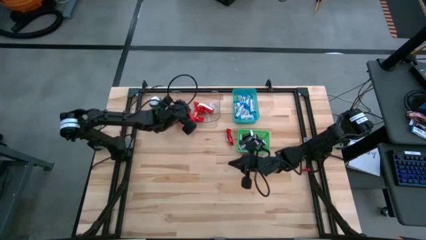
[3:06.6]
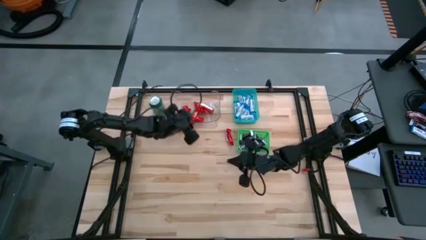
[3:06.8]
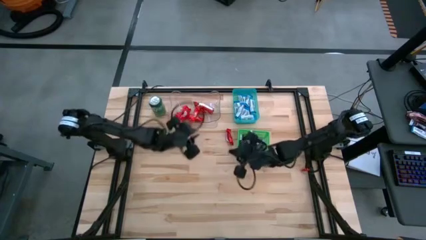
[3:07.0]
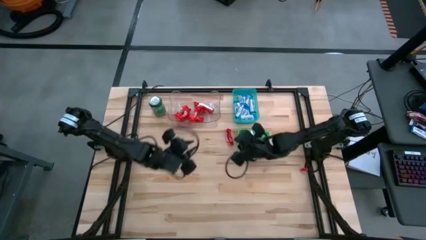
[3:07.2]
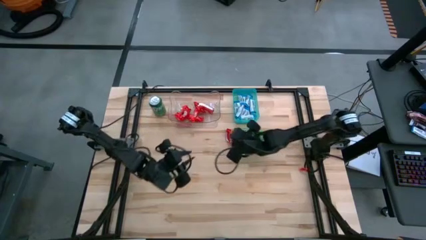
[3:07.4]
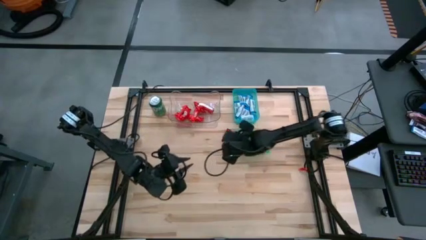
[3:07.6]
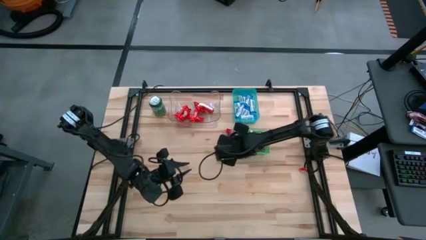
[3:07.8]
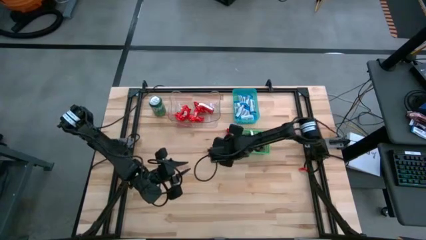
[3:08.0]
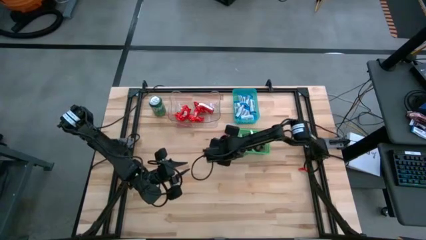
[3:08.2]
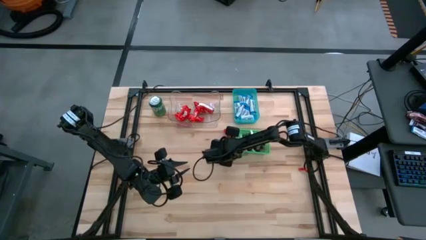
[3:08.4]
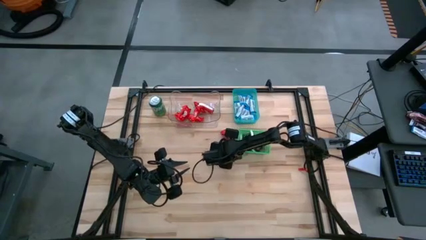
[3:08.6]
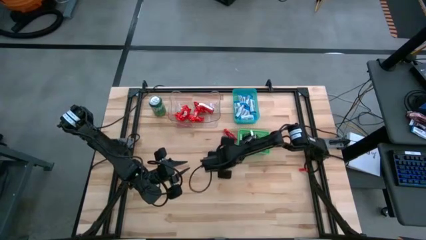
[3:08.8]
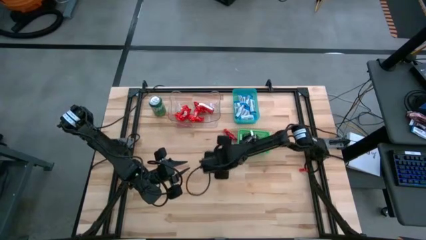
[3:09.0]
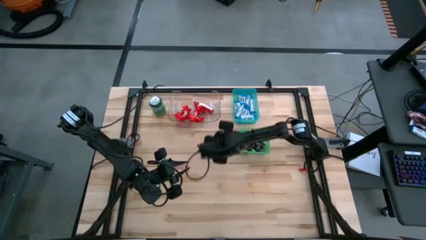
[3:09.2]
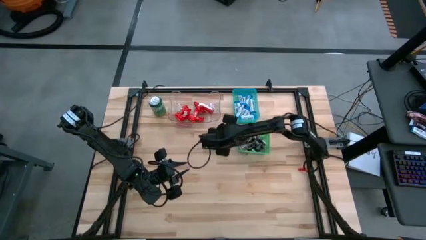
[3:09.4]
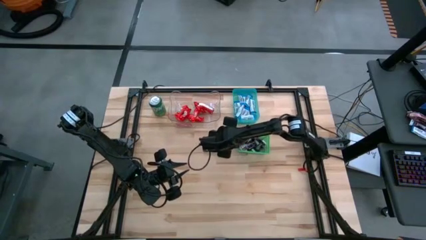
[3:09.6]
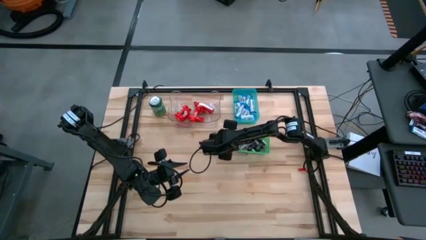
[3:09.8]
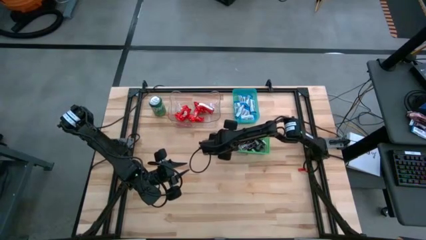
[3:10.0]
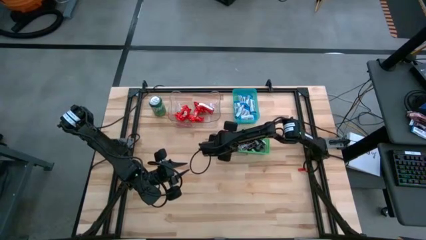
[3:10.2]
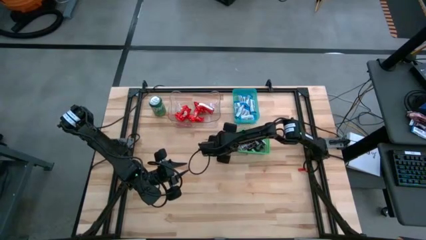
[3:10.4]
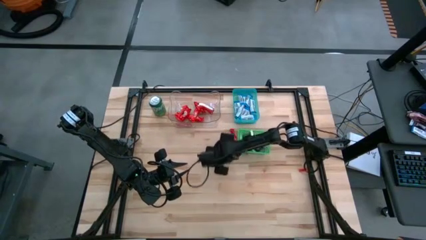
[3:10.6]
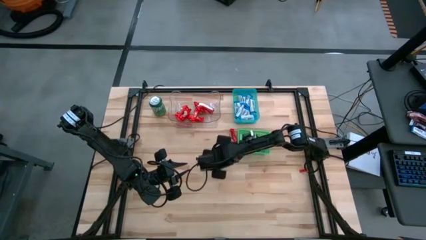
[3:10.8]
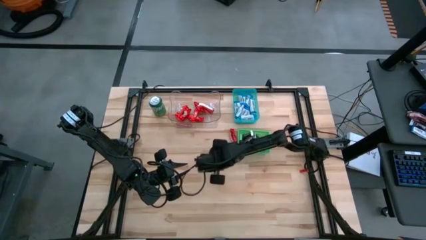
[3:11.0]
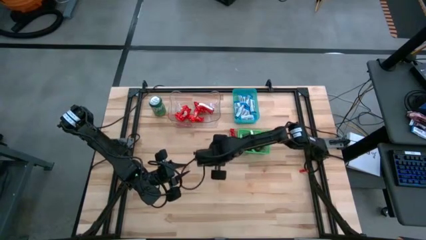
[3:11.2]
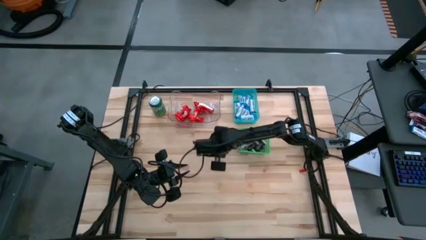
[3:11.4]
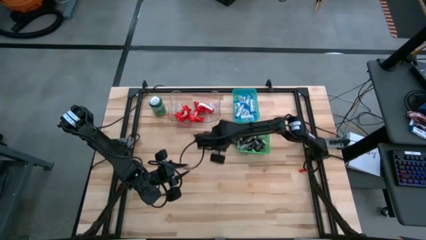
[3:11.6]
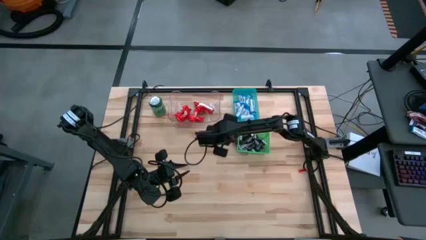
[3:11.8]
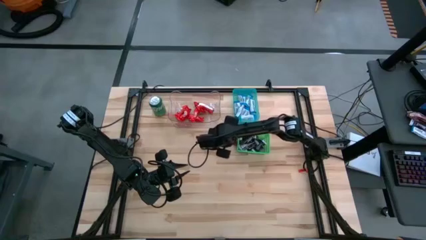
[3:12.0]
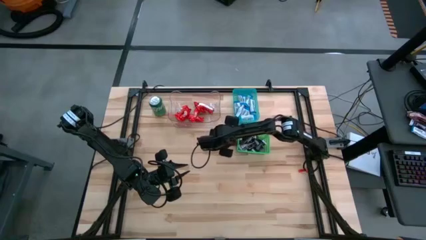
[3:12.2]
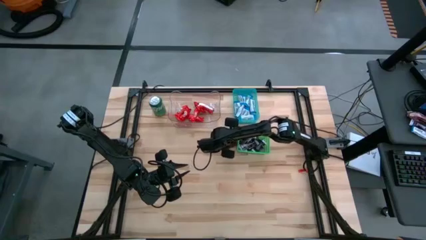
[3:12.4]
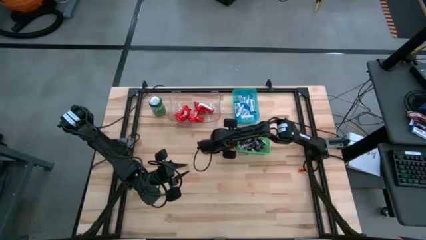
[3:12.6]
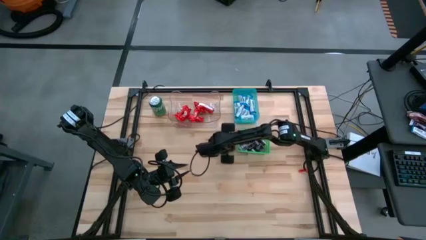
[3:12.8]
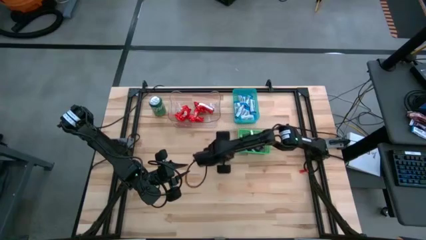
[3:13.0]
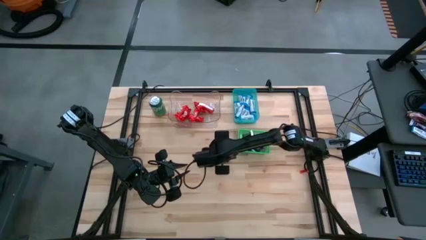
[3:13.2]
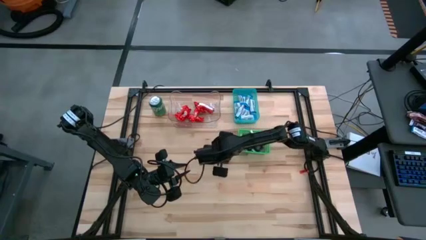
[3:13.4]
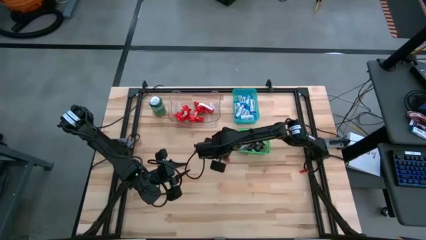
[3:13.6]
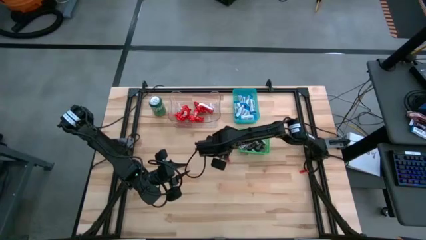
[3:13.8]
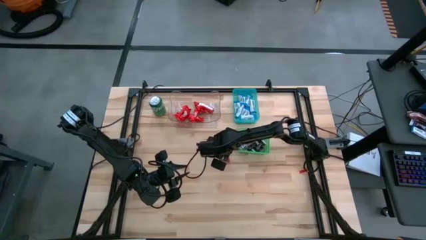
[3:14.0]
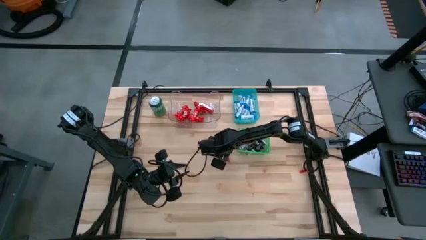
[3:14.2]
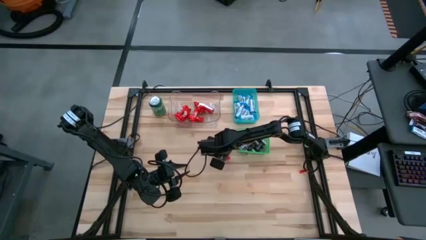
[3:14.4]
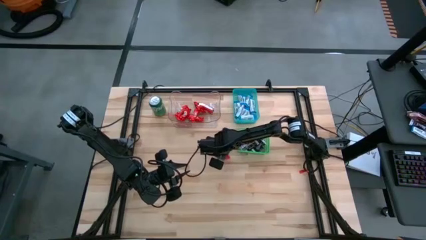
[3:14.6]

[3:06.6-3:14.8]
Task: Sort candy
Put the red chocolate bar into the transparent bin

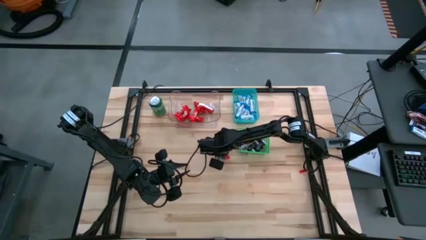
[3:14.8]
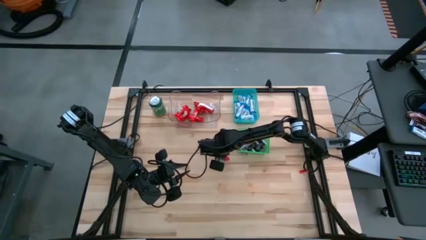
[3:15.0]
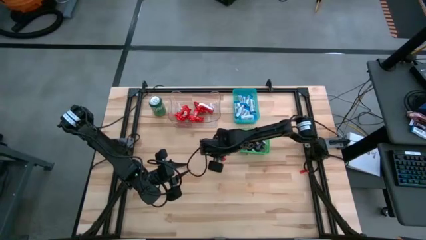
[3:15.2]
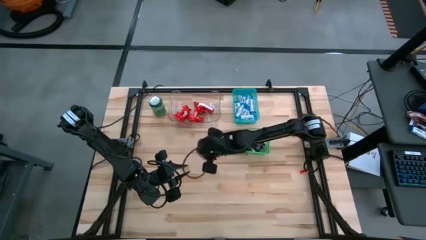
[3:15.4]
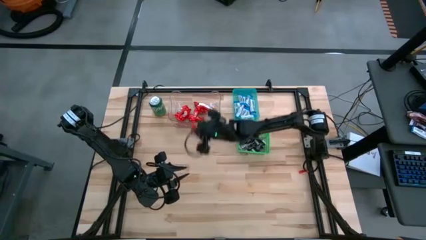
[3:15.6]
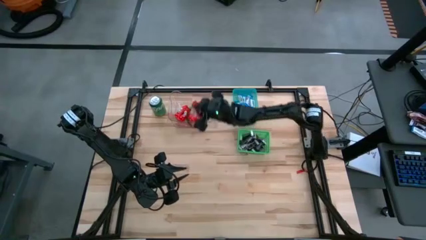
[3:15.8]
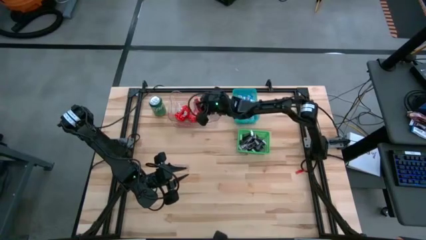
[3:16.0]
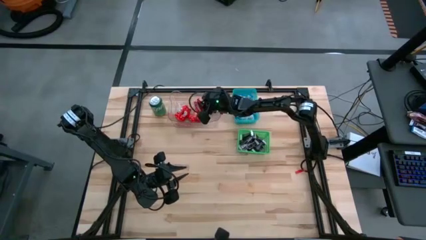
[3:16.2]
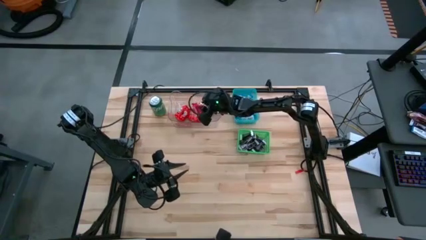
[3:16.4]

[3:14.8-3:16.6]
Put the red chocolate bar into the transparent bin

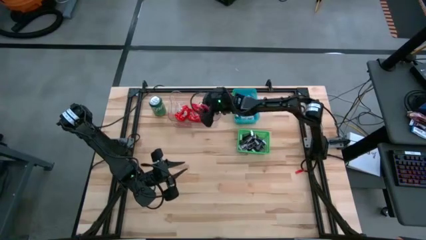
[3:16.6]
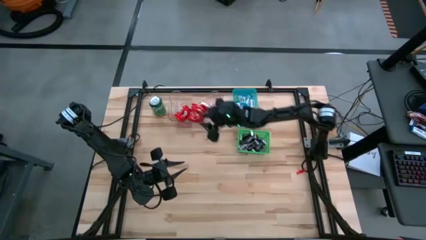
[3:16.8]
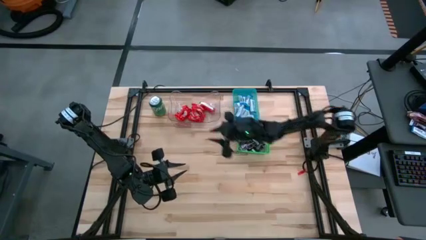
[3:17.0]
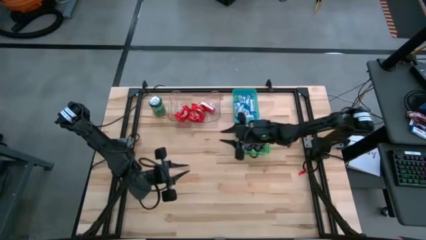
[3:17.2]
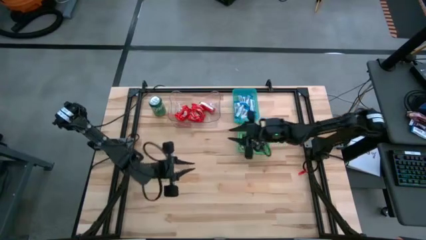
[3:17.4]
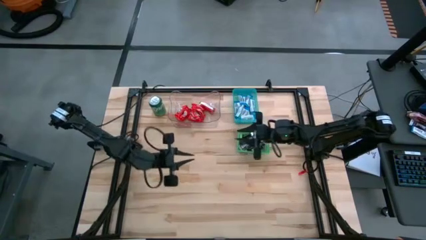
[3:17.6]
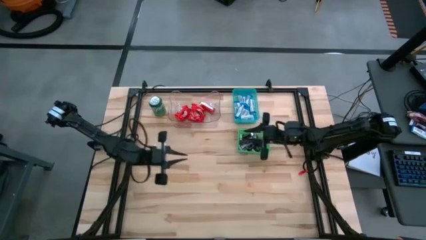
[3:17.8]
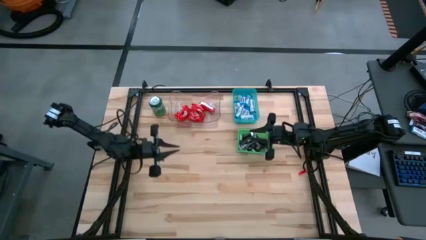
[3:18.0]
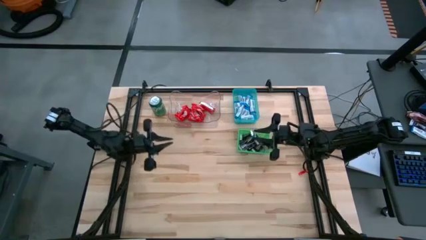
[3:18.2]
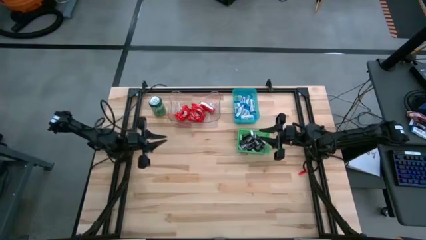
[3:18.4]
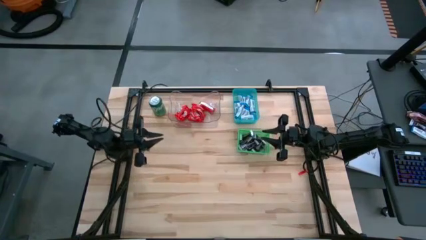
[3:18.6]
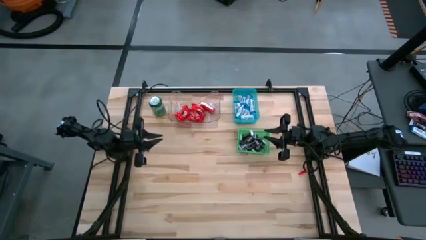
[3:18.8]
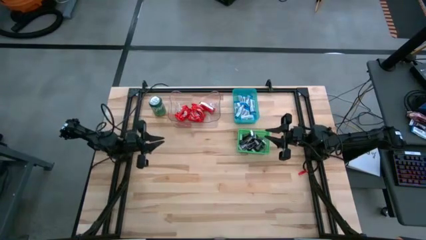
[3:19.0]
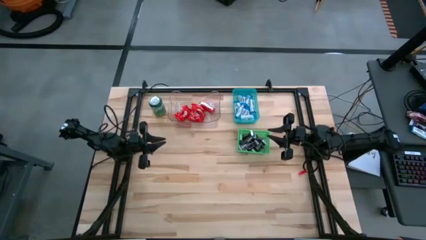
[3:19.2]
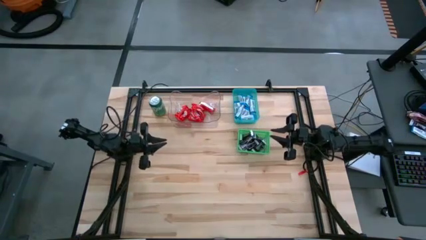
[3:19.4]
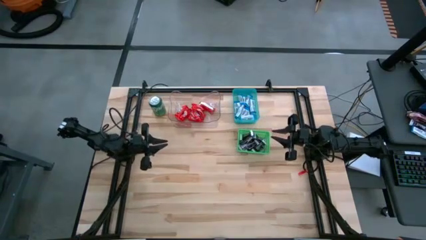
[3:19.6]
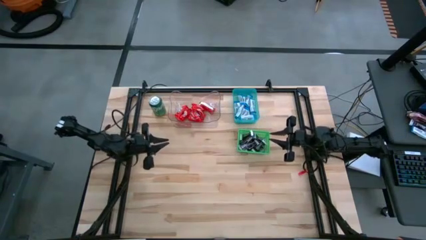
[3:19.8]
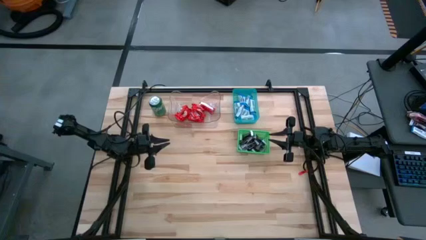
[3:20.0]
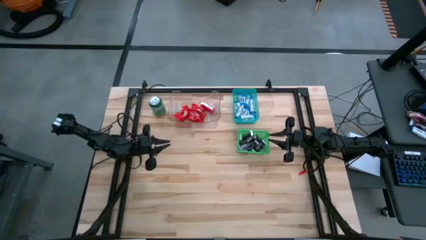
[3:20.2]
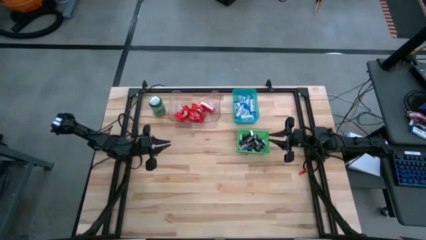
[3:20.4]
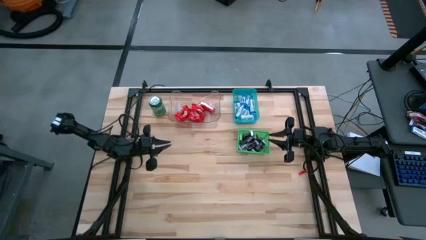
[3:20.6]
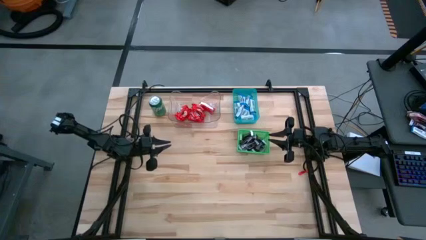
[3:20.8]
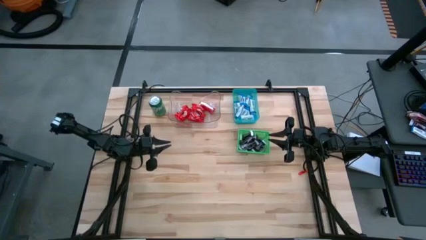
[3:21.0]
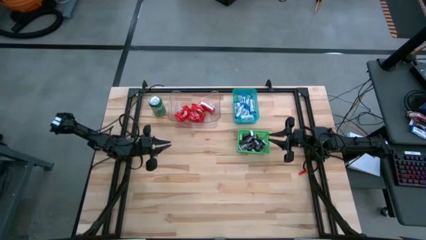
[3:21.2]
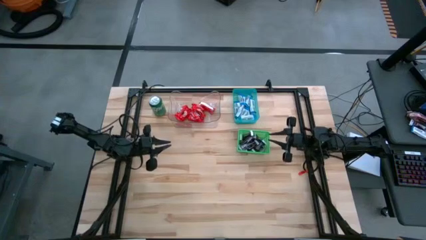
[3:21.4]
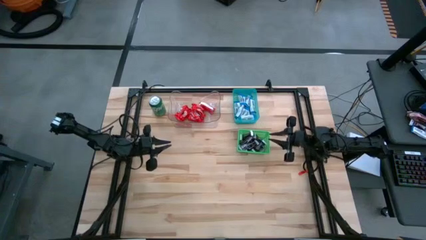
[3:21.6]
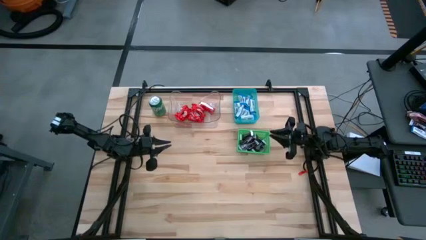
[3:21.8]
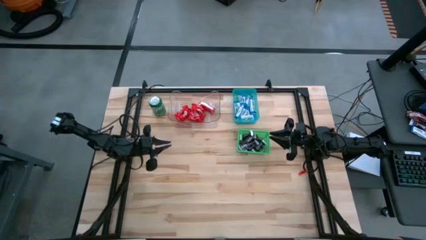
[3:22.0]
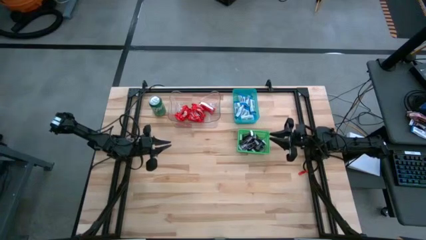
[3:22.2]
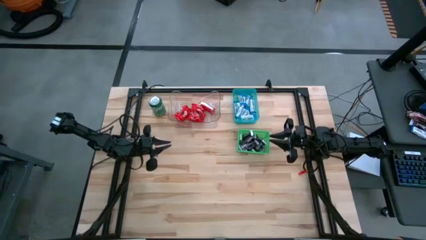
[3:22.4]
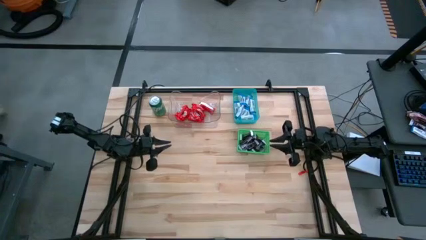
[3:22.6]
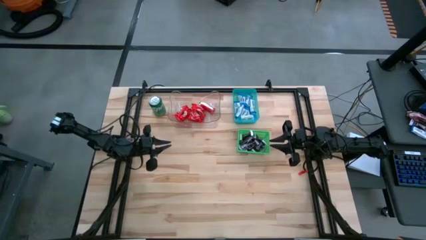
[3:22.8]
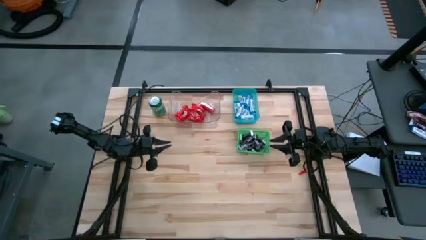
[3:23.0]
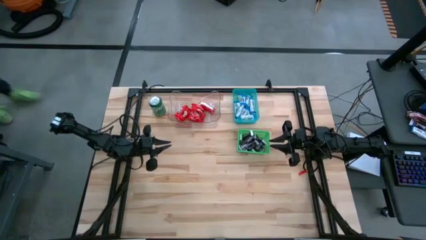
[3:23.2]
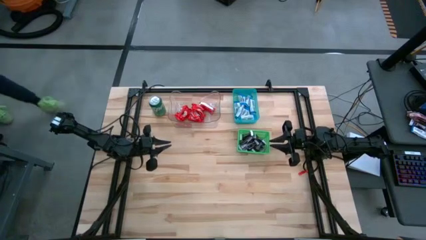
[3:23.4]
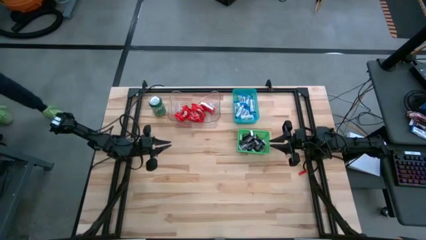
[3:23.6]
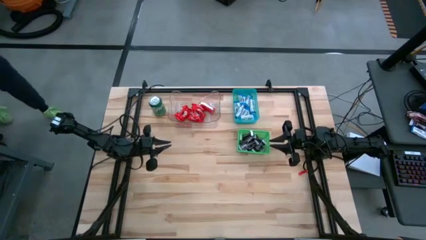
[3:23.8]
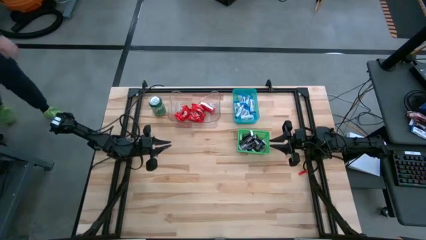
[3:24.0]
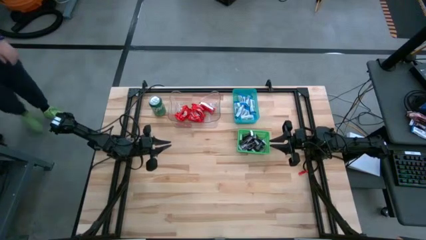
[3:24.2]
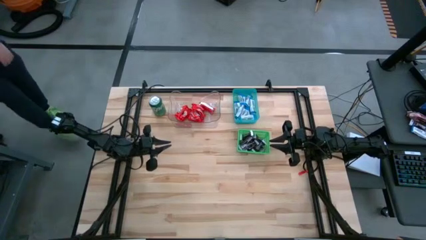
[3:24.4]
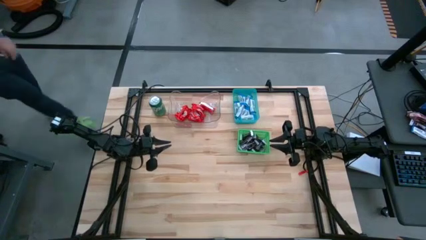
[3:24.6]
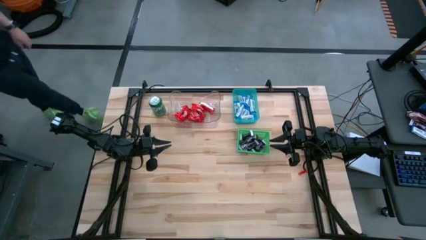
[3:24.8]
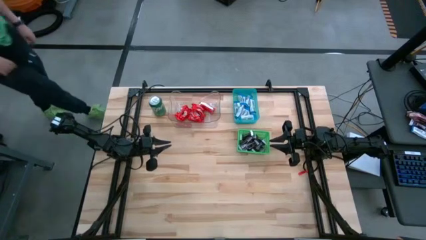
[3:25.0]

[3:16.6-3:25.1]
Return to Home Position
